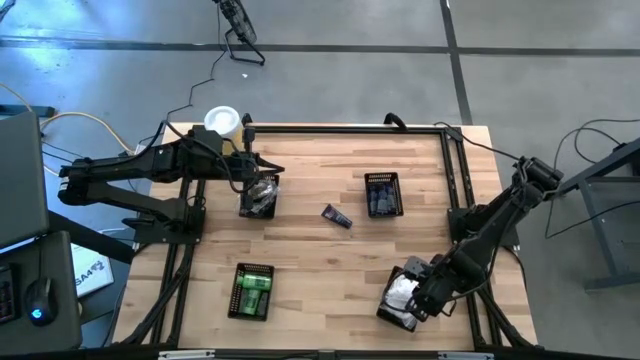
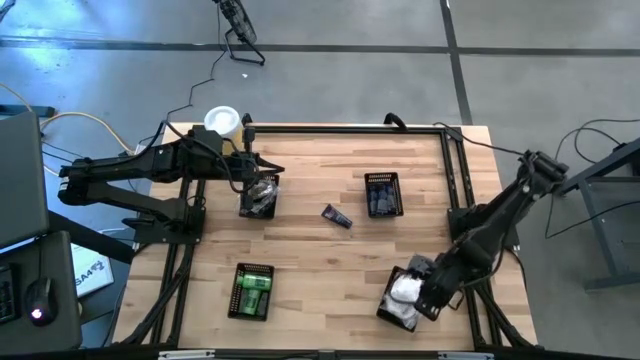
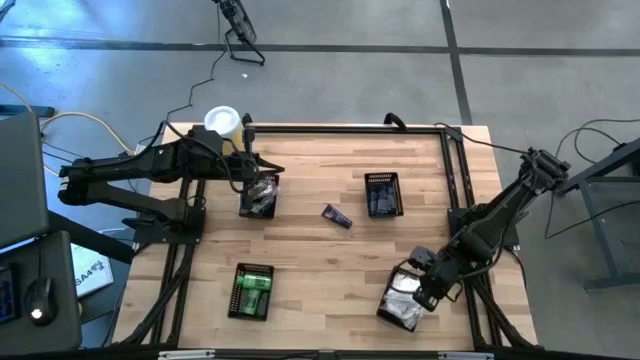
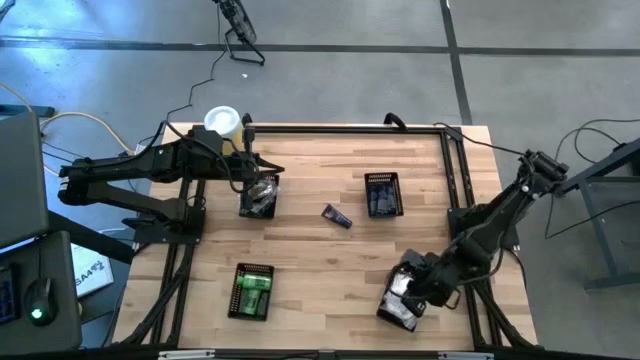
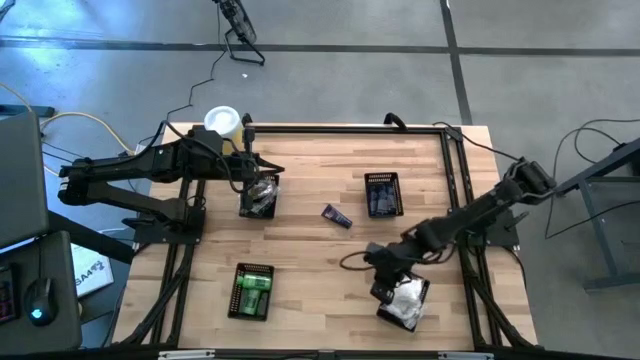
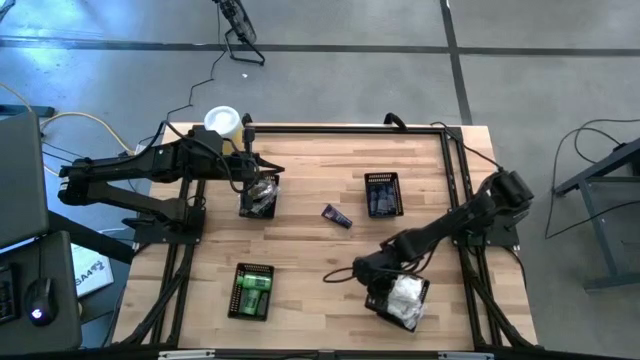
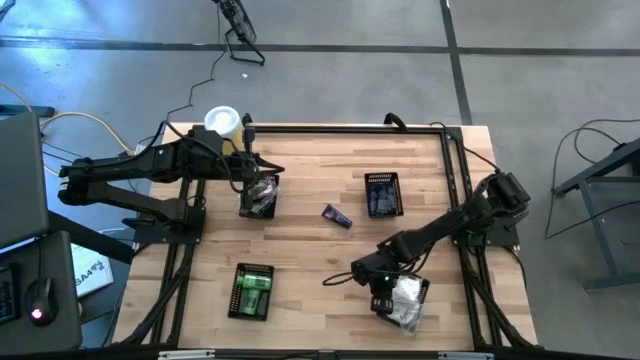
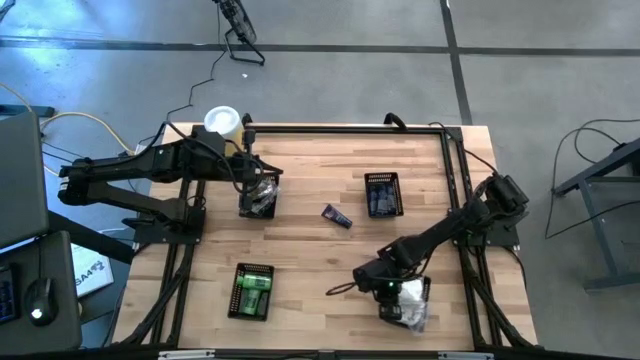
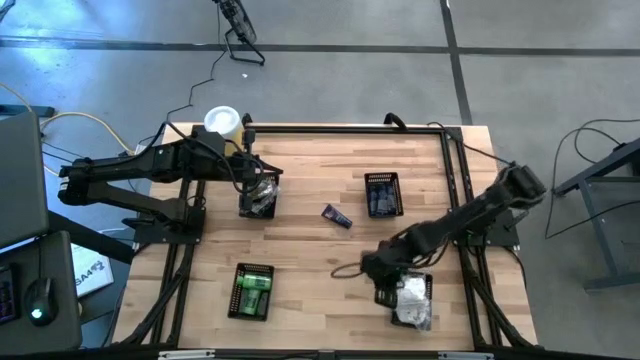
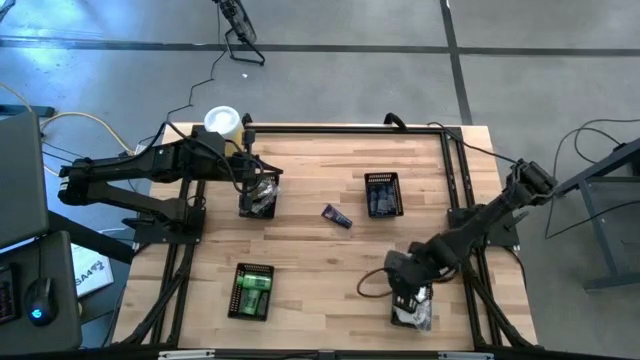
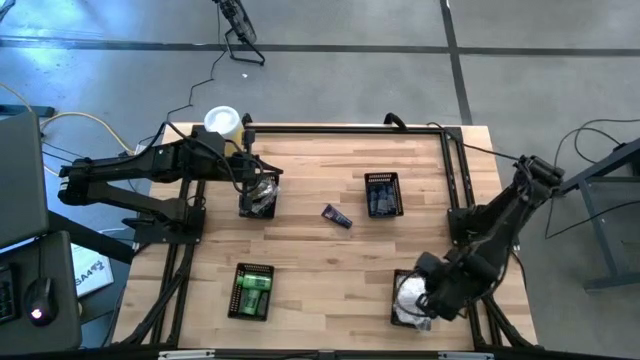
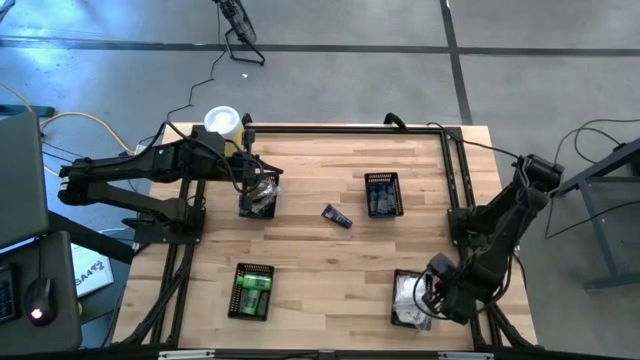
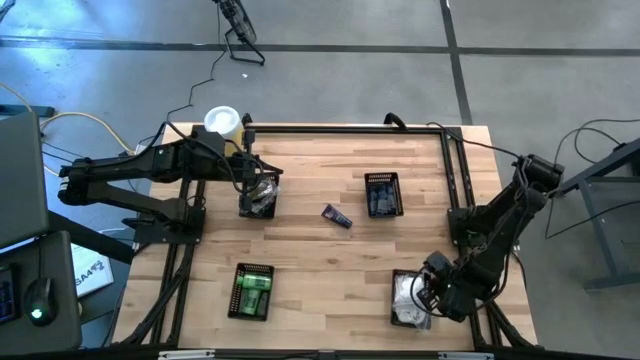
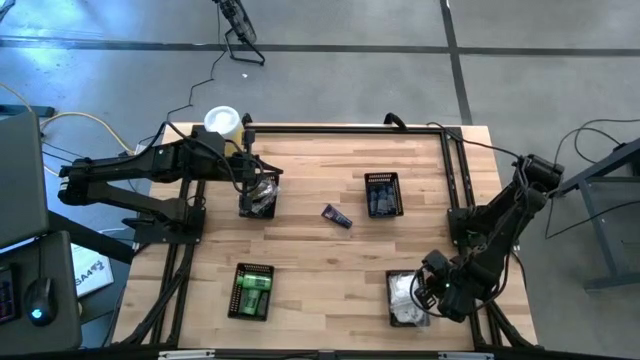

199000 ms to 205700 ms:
Task: Pick & Place Travel size toiletries
Adjust the bottom right black basket

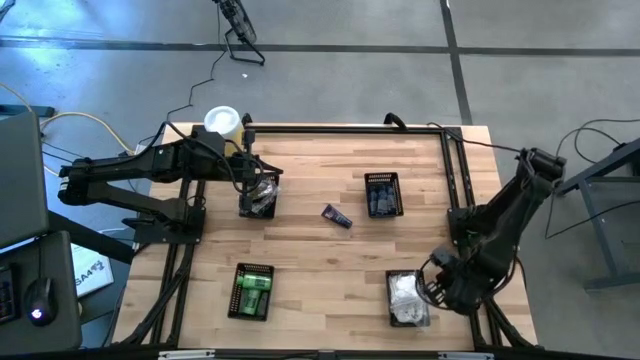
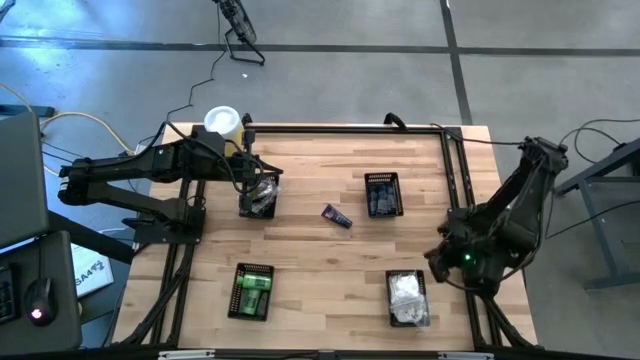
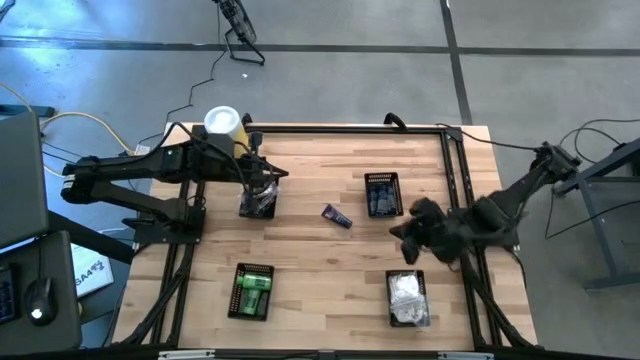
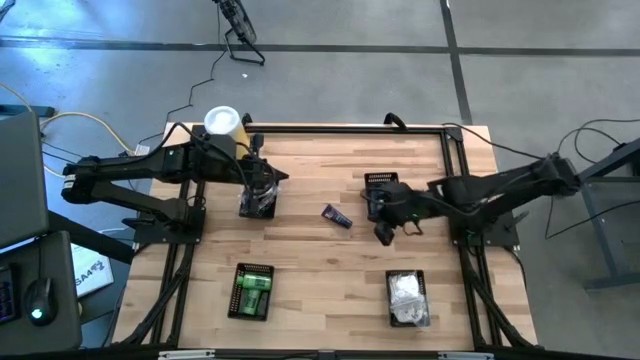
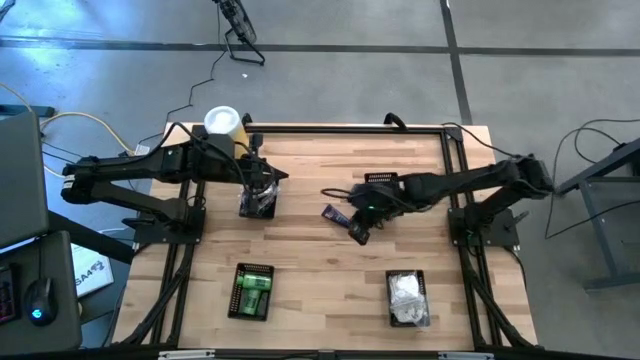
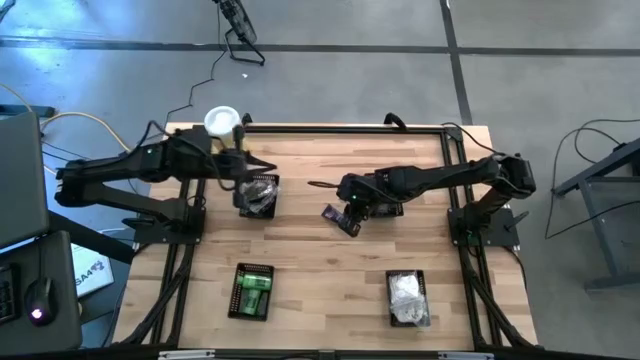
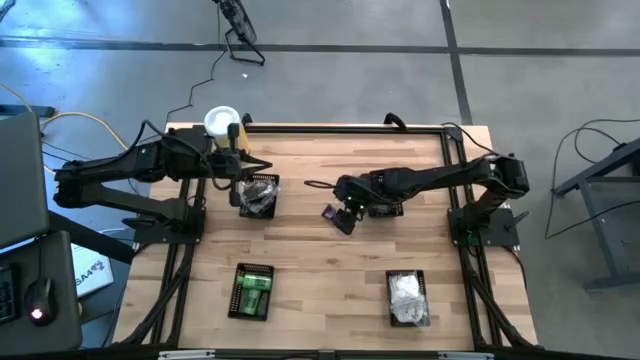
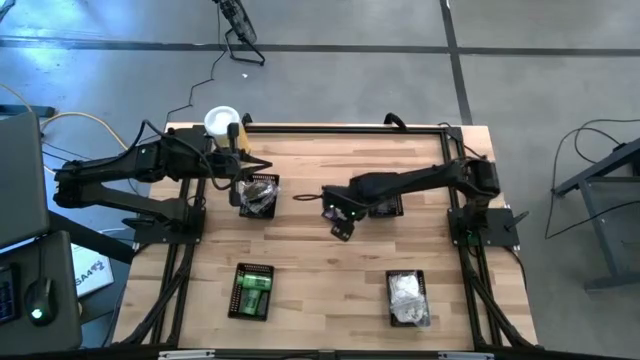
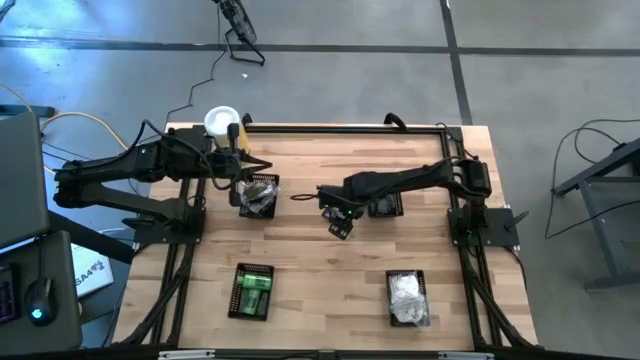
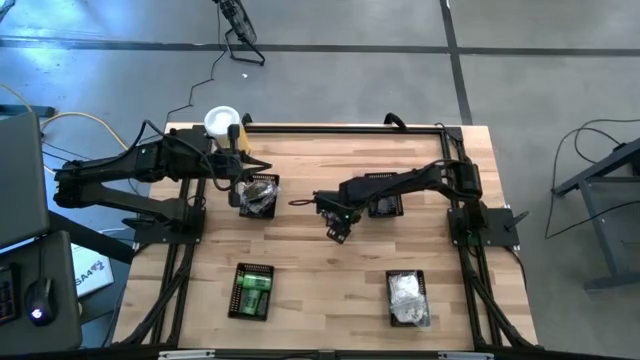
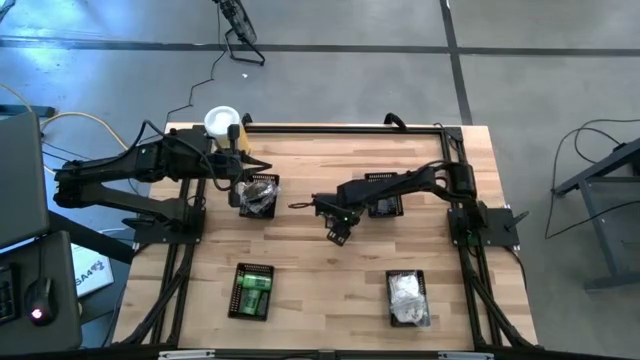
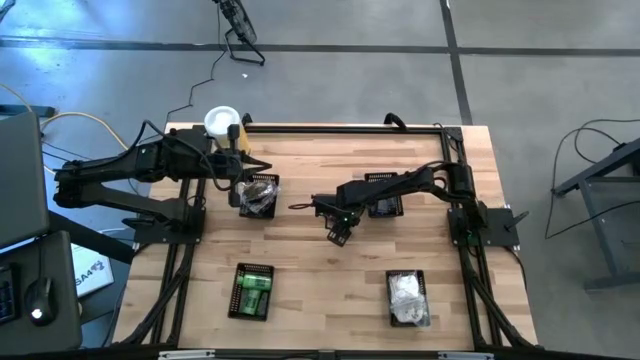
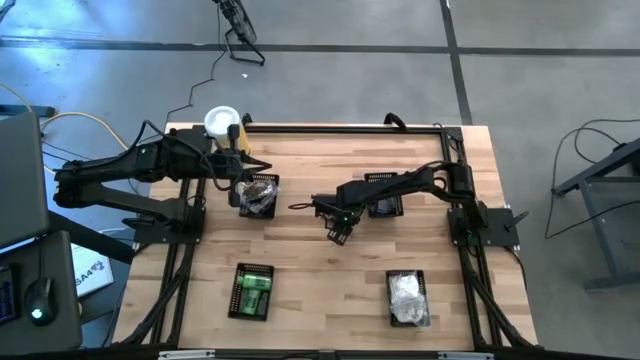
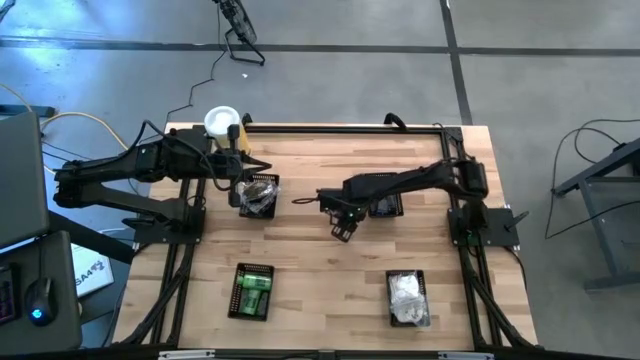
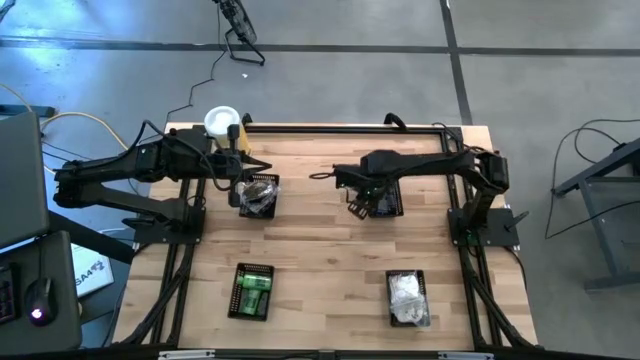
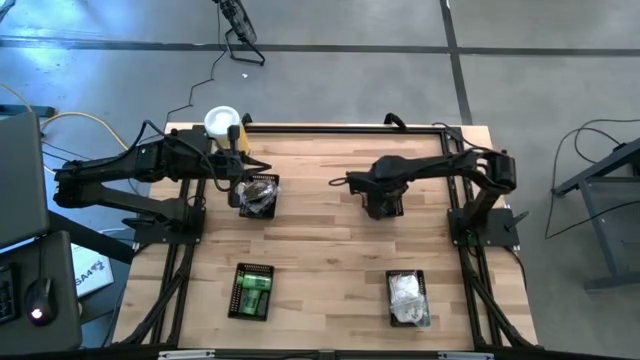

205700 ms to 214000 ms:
Put the blue shave cream into the top right black basket

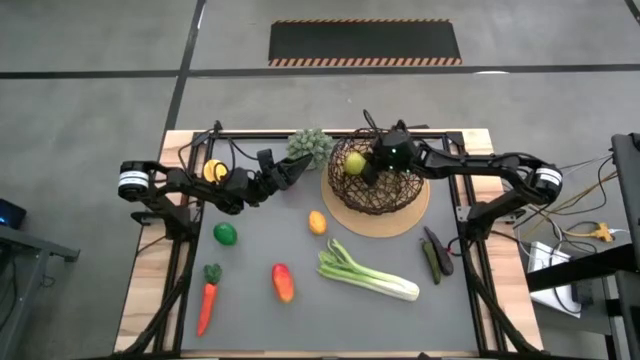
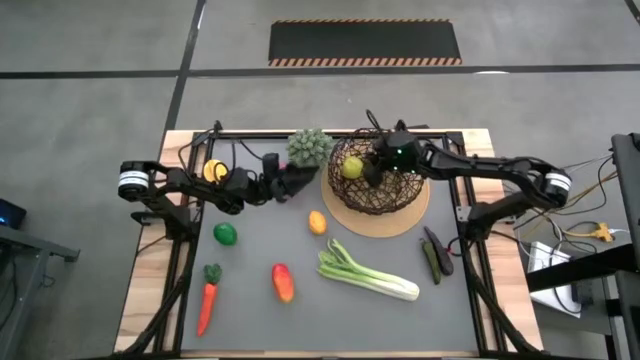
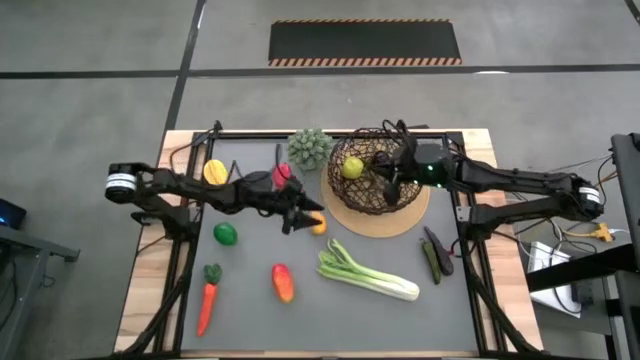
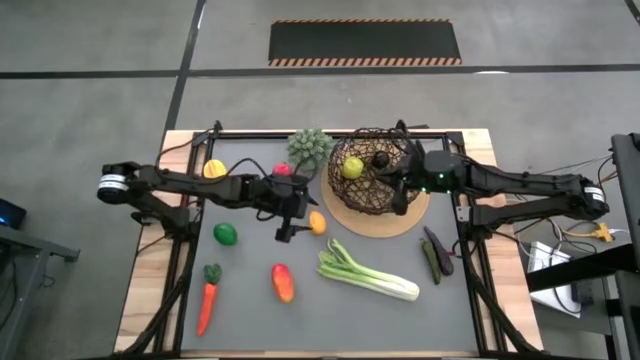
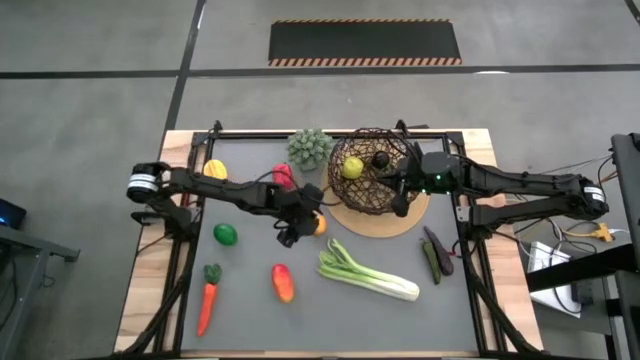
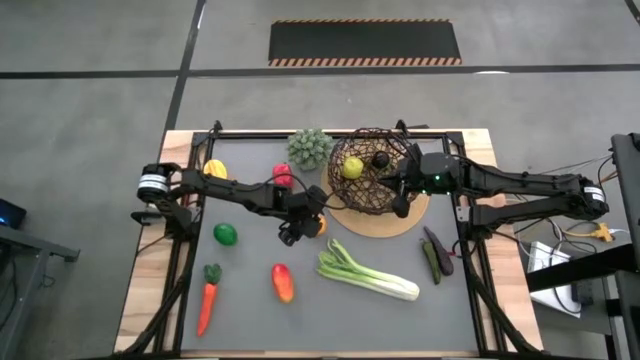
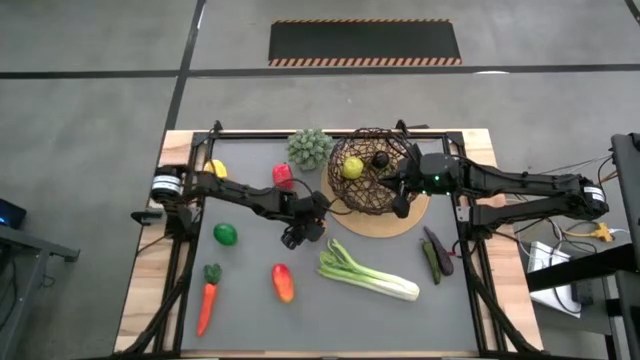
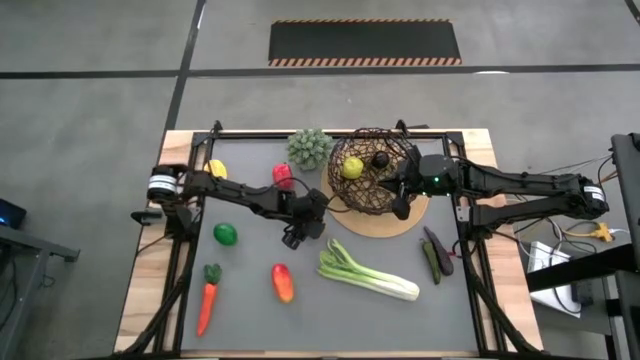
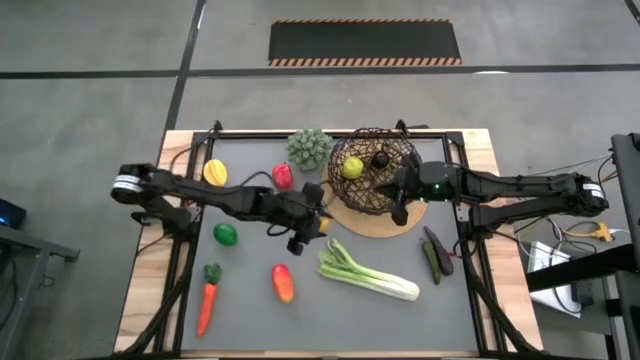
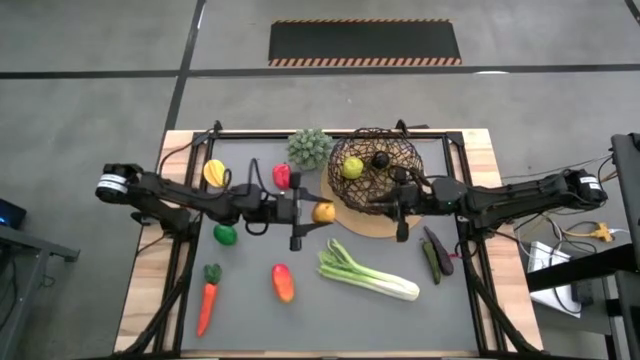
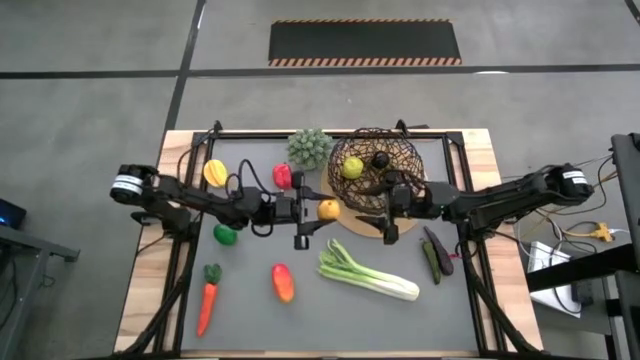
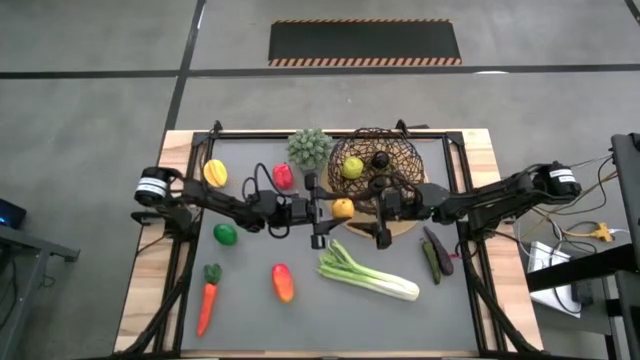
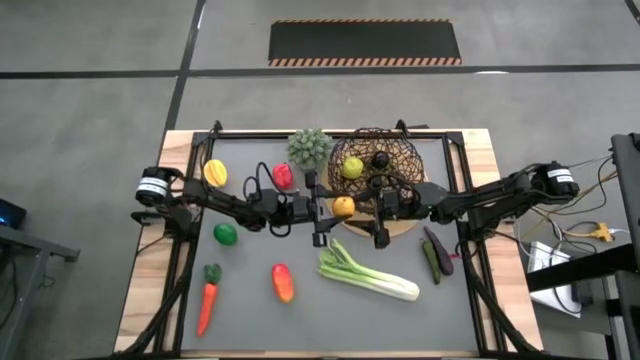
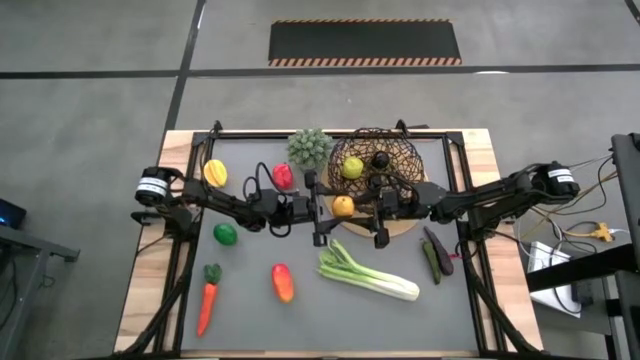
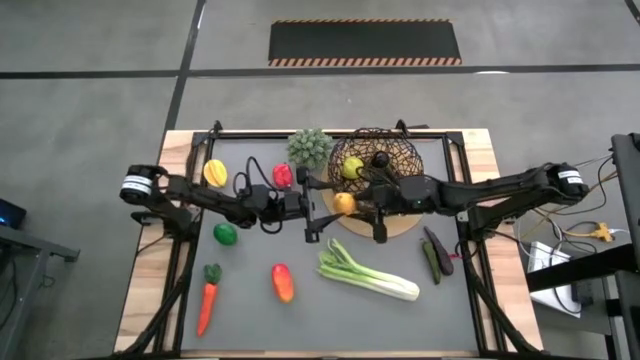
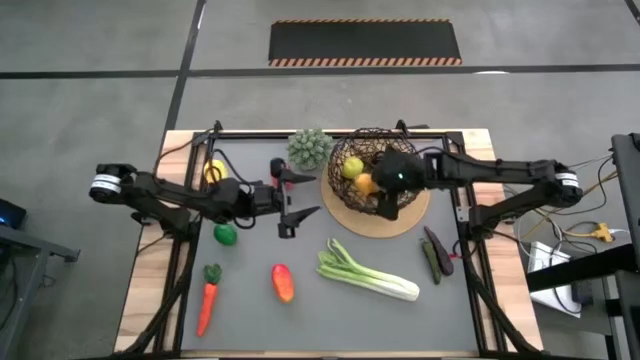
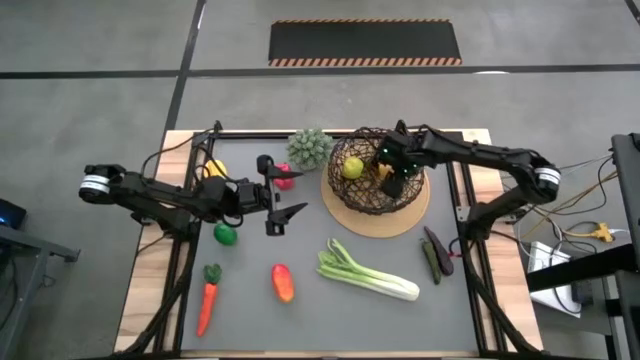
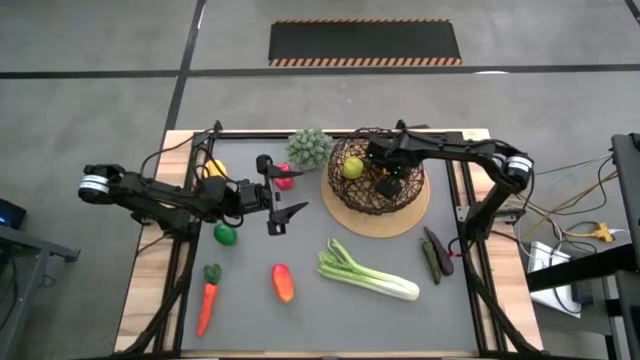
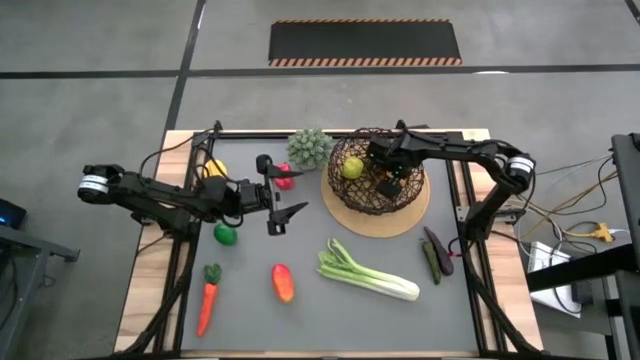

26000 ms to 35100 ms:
Task: Build produce basket
Put the yellow mango into the black wire basket
